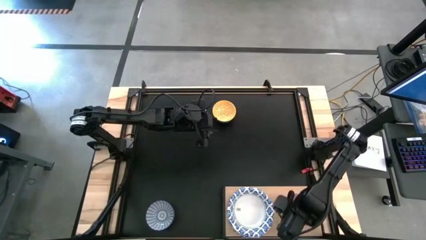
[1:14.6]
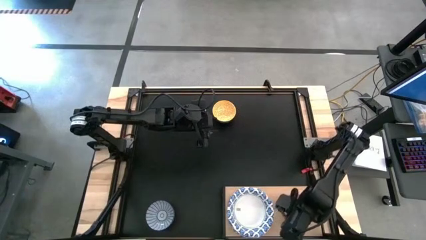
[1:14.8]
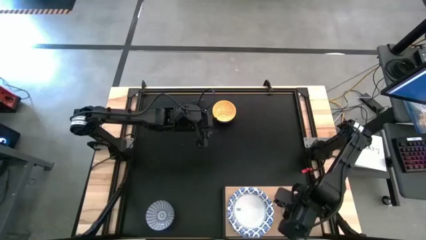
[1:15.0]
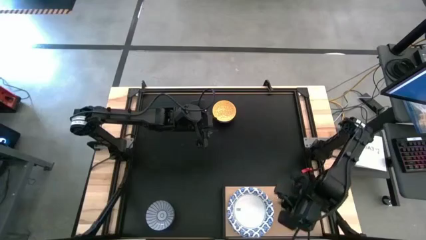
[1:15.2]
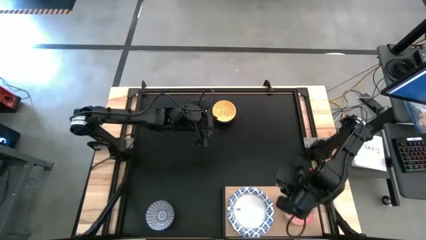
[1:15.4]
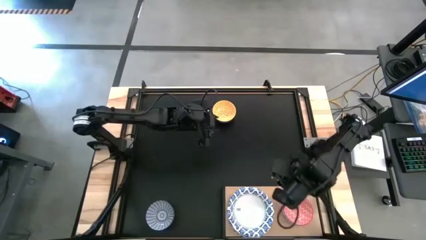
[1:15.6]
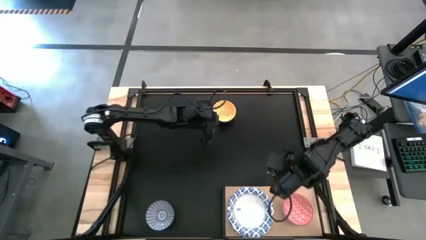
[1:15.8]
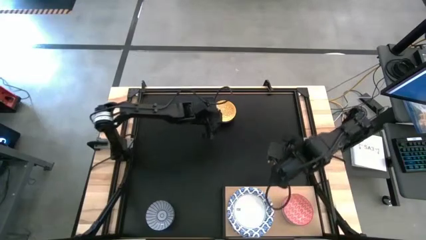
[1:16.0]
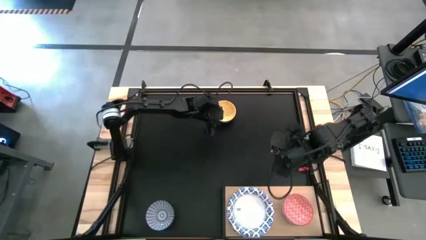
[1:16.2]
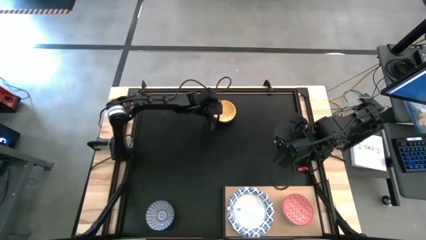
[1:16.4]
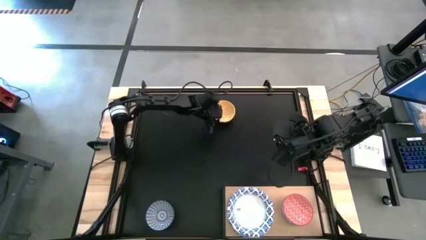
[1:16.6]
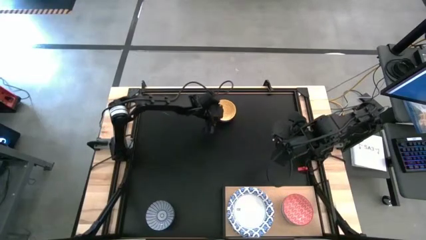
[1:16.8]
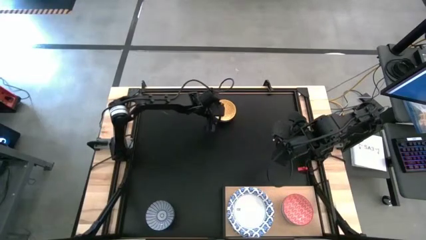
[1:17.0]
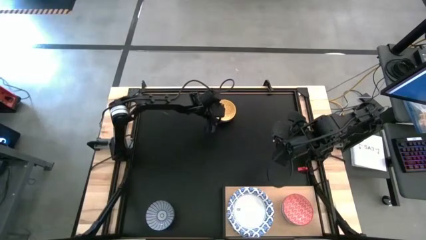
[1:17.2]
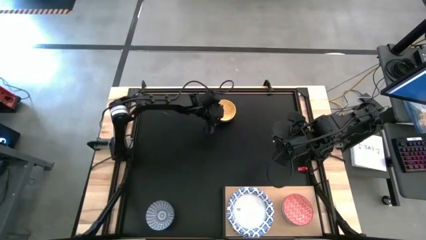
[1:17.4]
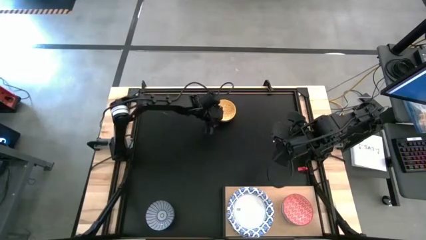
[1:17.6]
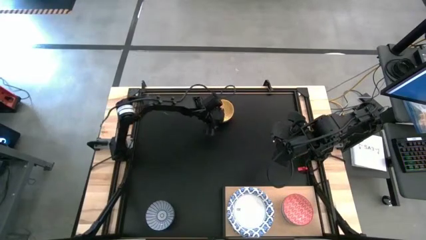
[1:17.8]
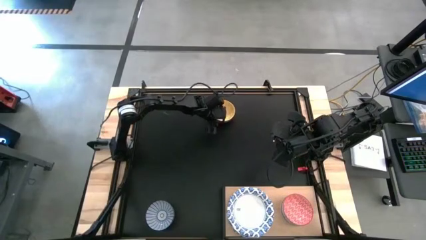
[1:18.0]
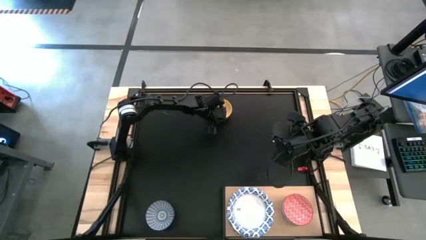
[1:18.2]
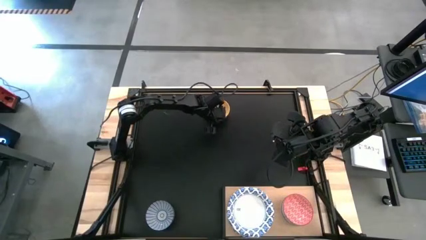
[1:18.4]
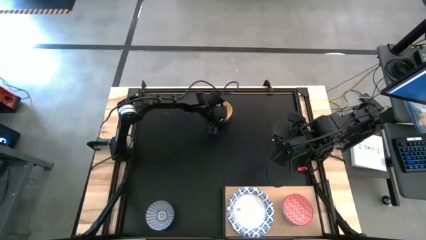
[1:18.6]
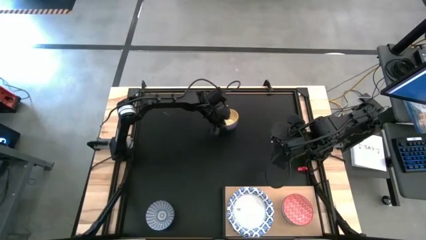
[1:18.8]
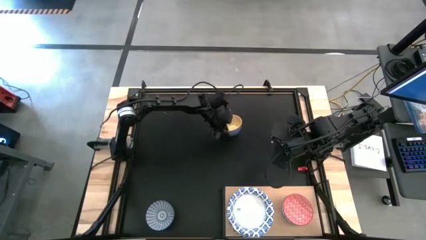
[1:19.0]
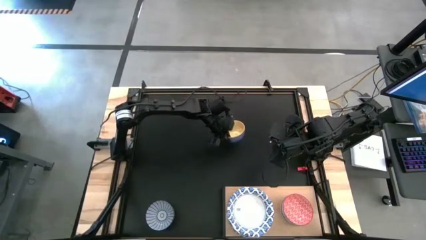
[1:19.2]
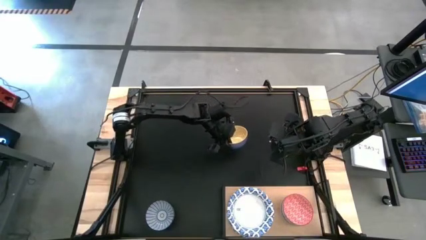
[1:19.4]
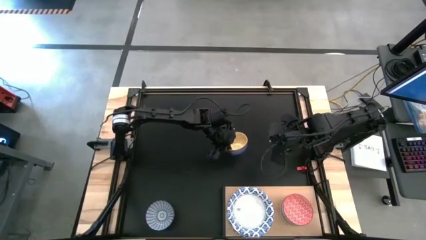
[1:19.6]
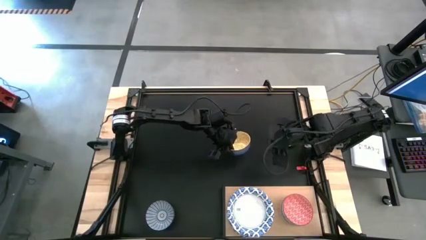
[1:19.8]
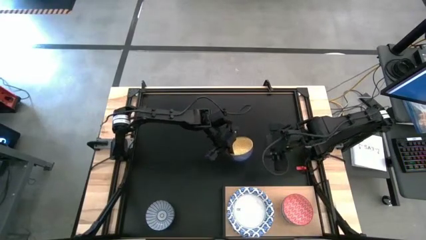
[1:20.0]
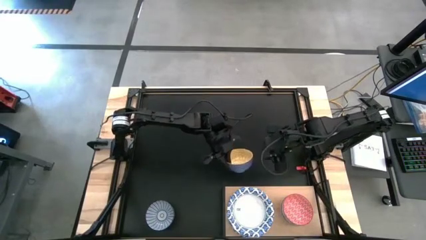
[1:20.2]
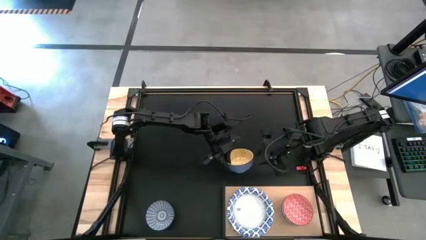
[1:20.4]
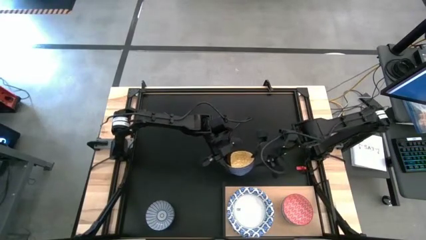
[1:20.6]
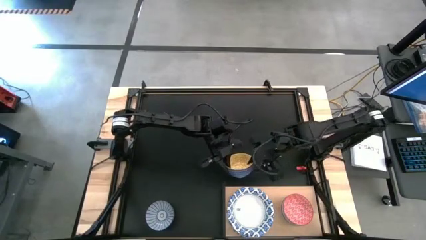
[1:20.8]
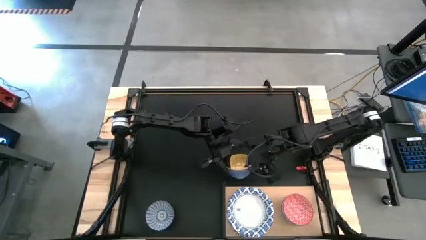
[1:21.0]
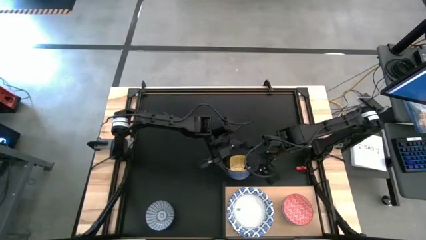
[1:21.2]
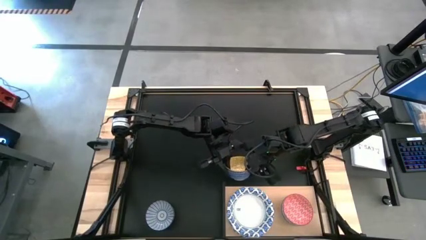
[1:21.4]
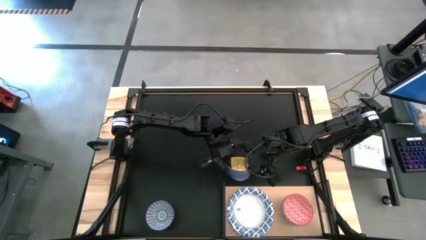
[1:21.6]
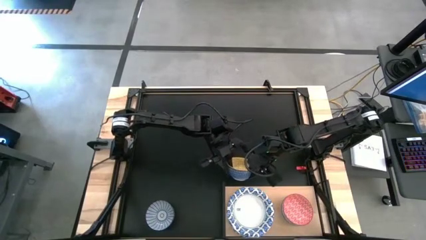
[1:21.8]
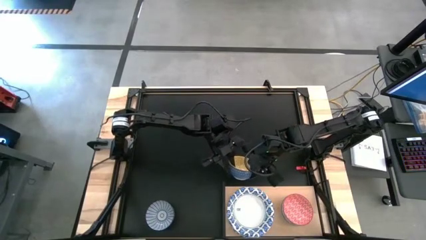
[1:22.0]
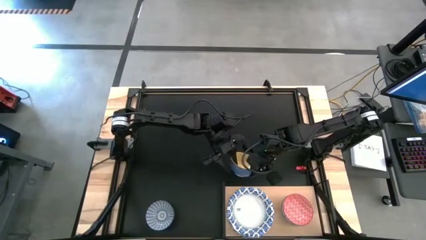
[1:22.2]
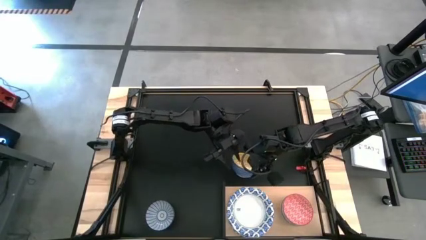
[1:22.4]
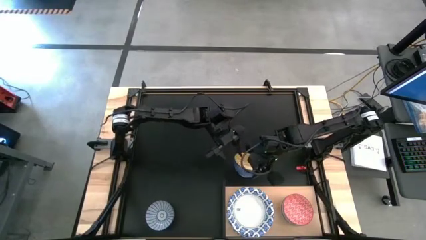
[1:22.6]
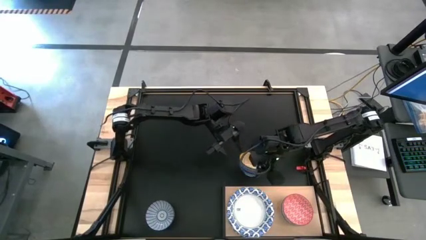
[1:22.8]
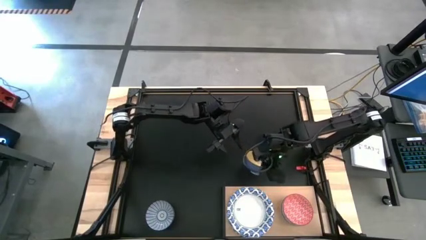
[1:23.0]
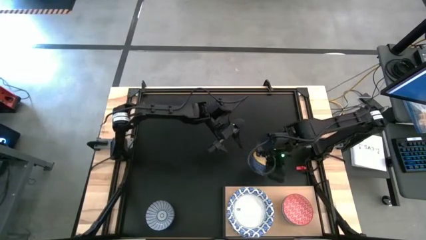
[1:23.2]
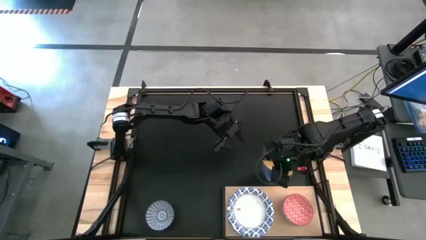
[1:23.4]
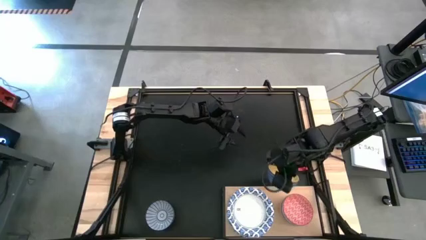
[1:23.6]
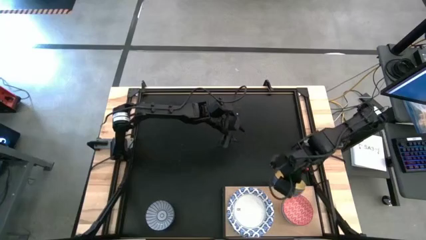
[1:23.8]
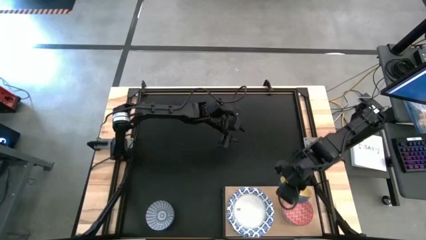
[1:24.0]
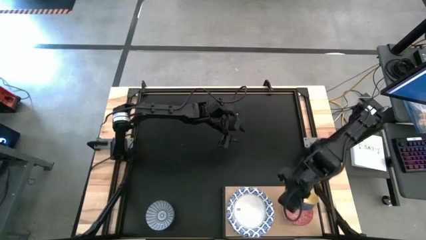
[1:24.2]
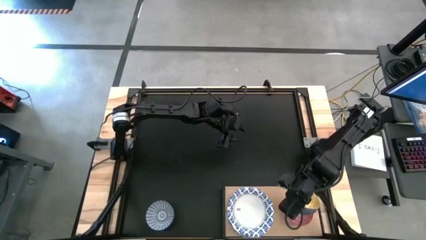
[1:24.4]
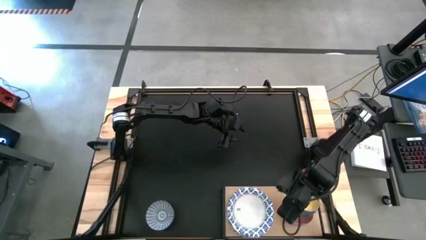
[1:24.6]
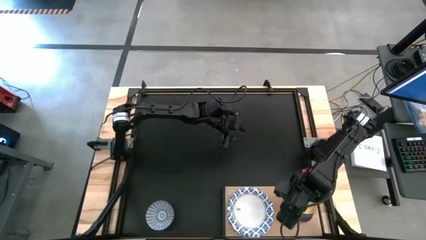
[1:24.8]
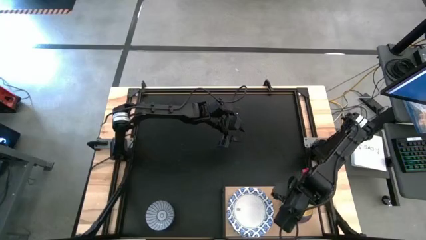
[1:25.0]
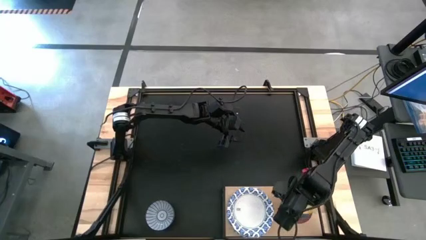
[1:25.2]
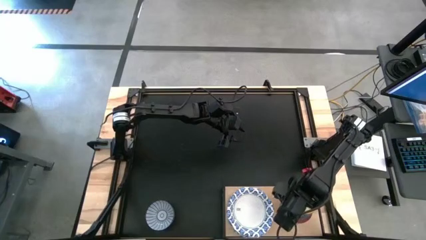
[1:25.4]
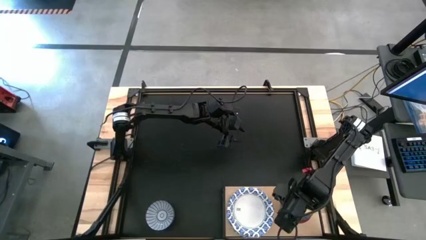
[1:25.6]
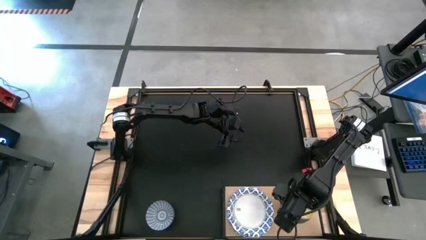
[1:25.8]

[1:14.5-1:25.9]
Task: Place and stack bowls onto a shelf
Stack the yellow bowl on top of the red bowl on the shelf

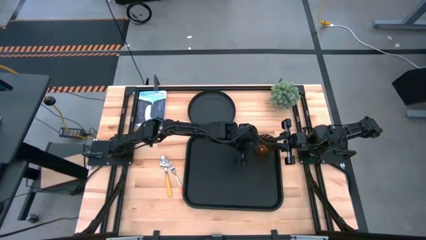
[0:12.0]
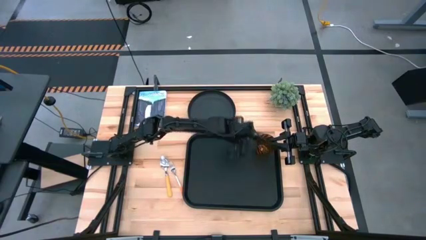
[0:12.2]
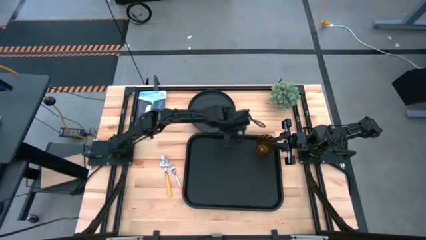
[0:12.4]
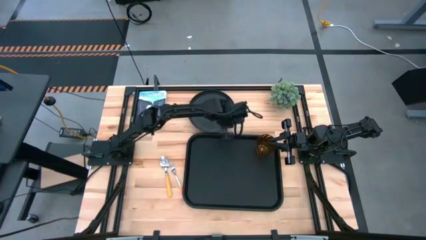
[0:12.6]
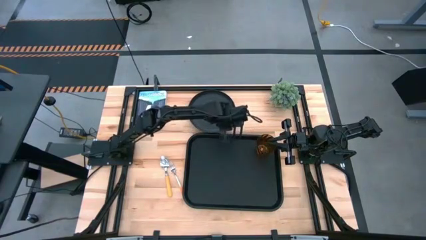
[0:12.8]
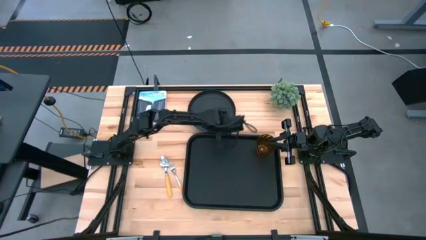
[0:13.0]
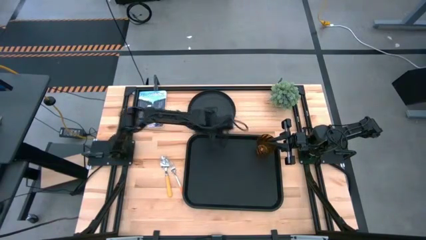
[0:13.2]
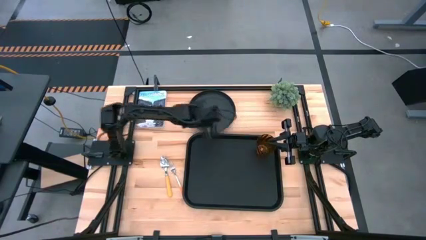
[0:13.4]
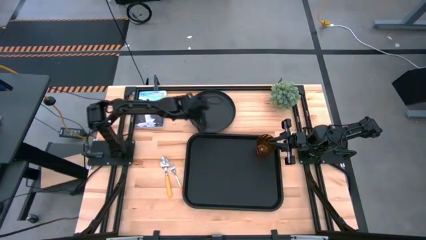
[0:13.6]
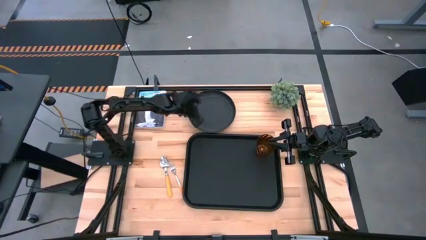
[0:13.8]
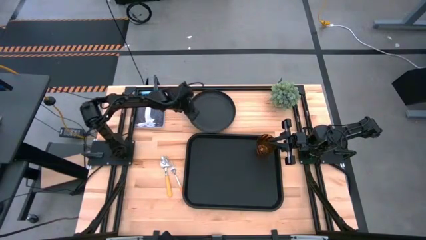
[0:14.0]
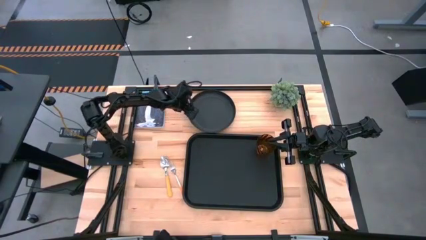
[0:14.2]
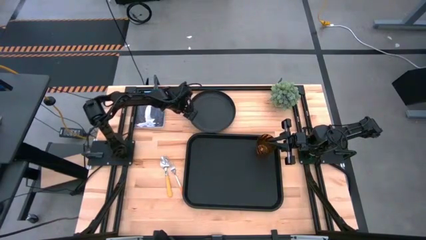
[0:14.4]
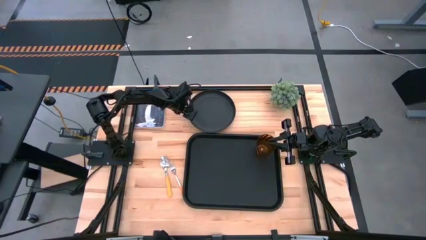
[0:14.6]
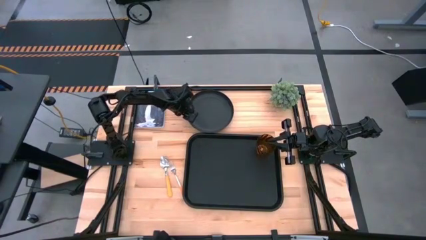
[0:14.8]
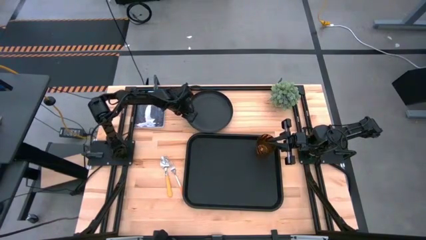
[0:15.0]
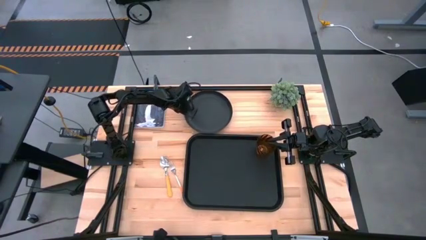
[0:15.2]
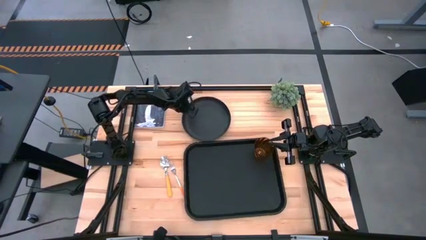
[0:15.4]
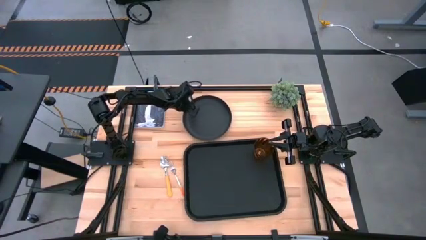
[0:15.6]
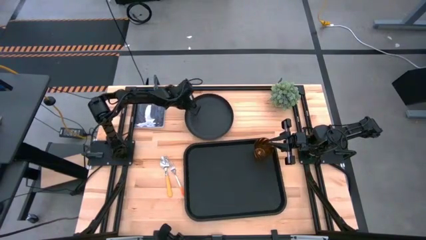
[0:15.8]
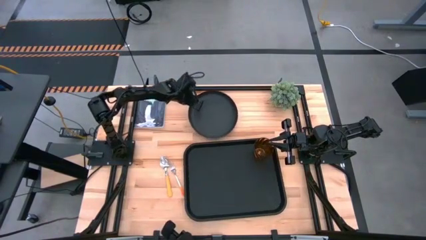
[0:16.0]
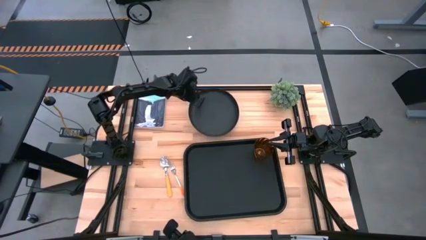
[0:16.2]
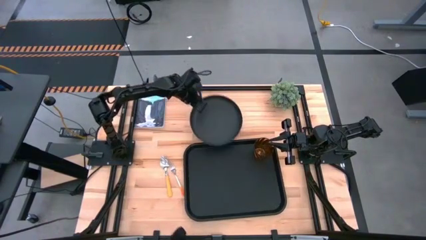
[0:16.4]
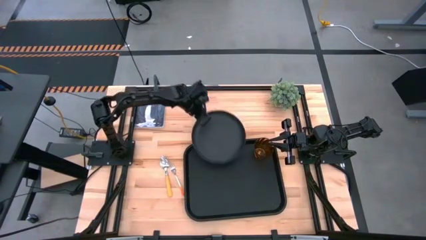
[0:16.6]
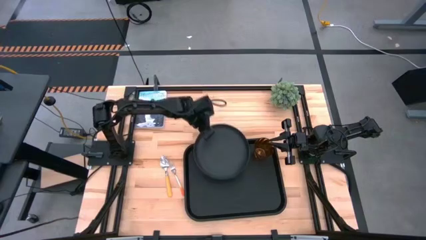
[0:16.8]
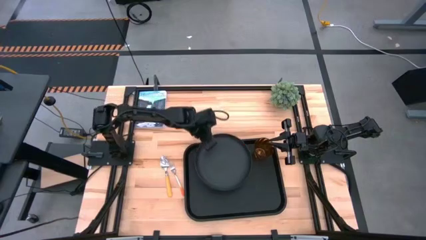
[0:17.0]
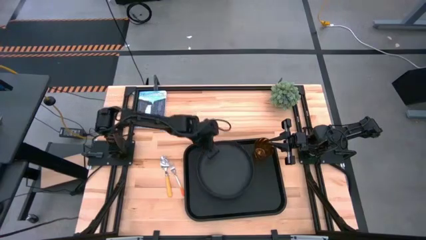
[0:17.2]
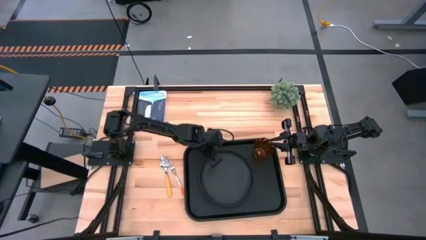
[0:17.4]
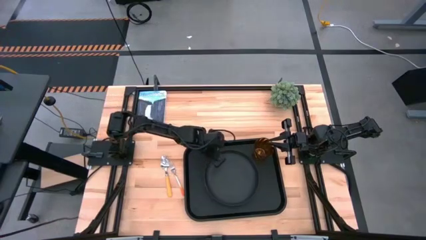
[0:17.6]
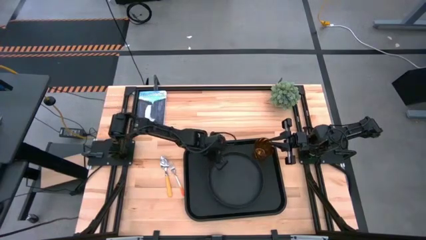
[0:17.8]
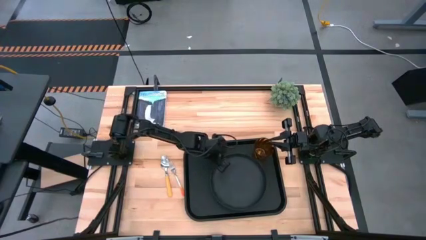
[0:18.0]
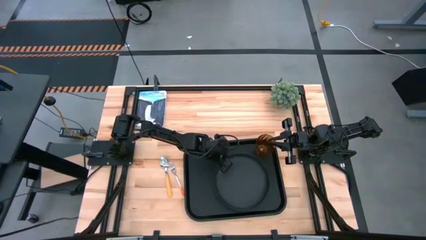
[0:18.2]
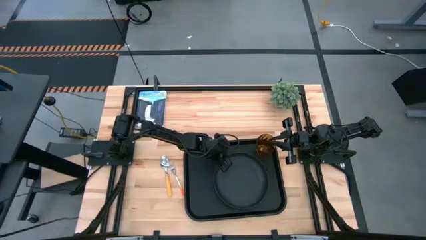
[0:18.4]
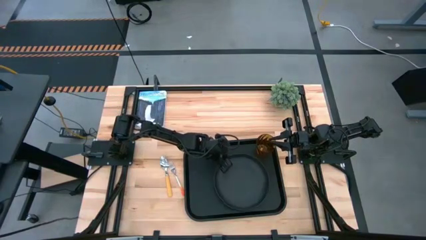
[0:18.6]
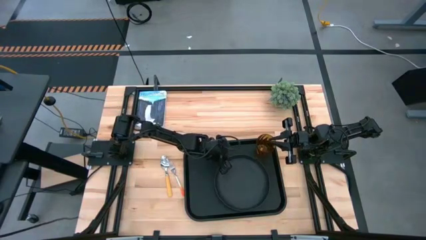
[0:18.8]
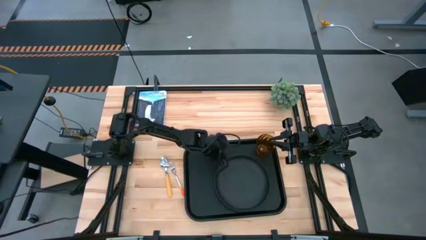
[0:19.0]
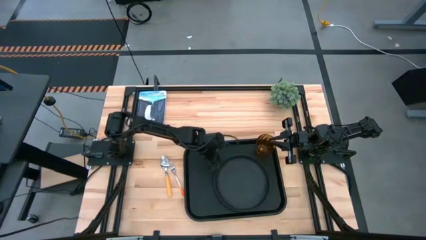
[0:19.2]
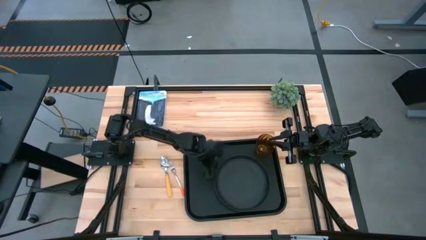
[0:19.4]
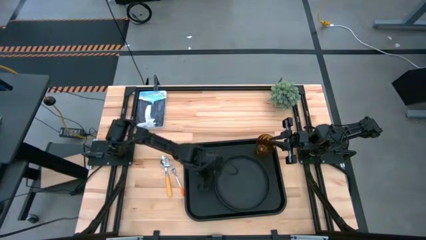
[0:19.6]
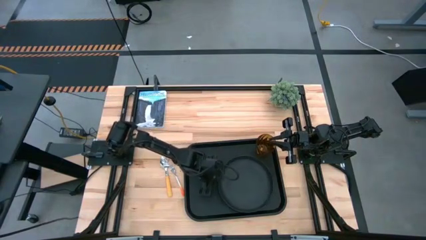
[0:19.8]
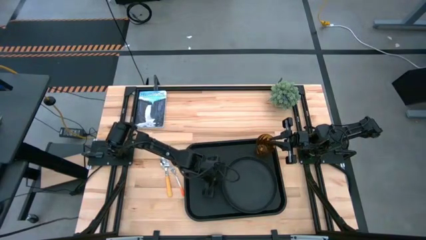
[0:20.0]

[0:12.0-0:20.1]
Task: Pick and place plate/cup/fork/spoon on tray
Put the black plate on the black serving tray to the bottom left of the yellow glass cup
